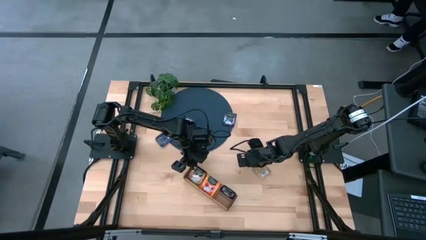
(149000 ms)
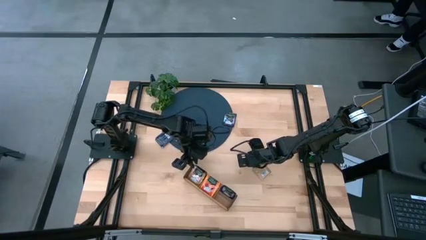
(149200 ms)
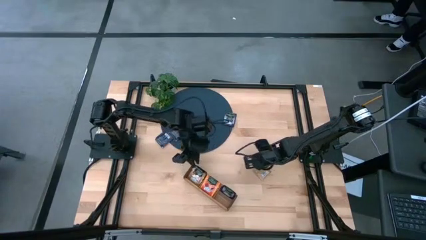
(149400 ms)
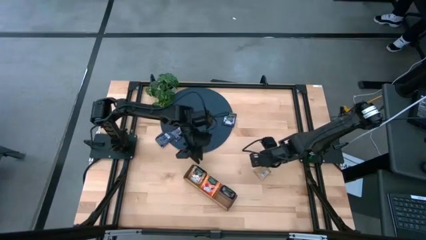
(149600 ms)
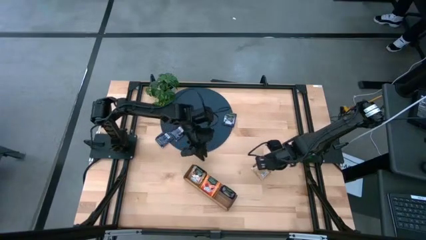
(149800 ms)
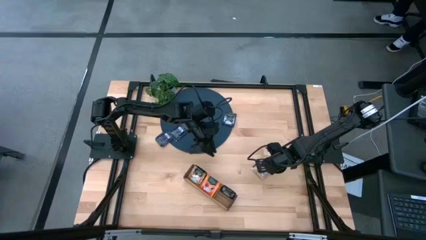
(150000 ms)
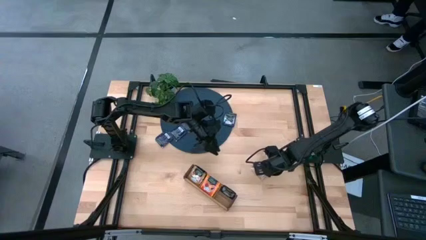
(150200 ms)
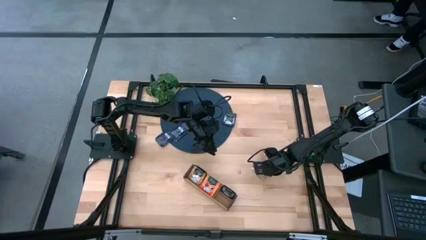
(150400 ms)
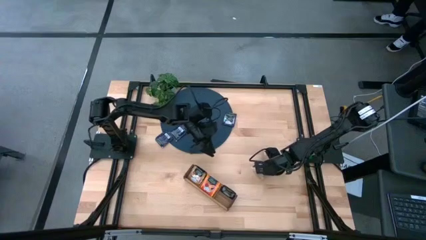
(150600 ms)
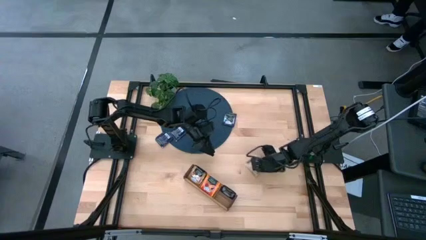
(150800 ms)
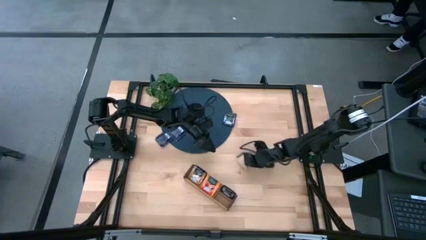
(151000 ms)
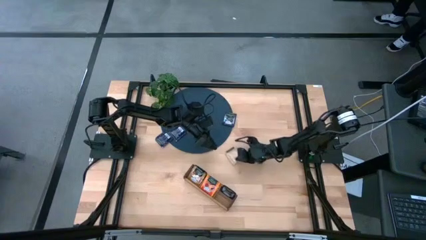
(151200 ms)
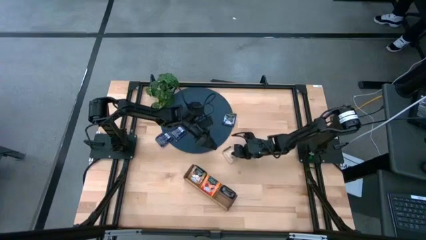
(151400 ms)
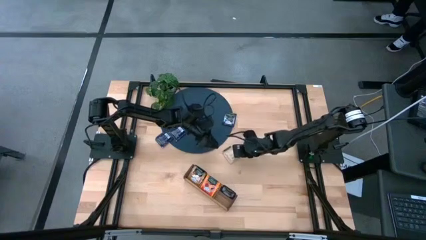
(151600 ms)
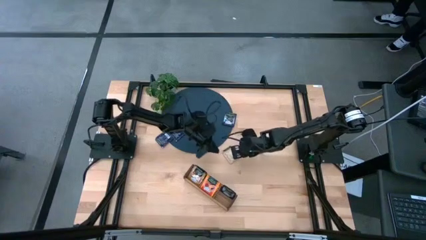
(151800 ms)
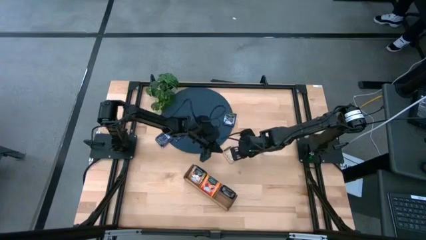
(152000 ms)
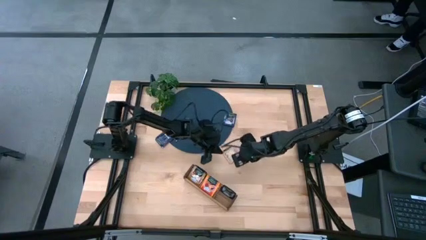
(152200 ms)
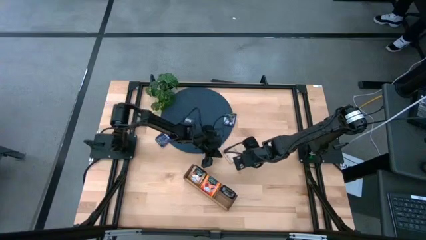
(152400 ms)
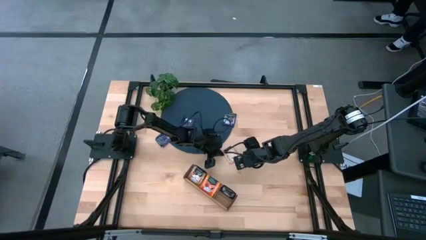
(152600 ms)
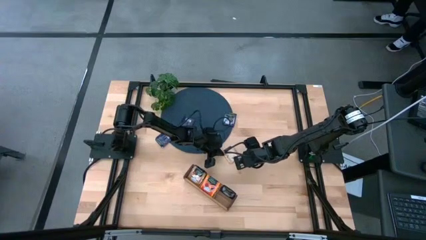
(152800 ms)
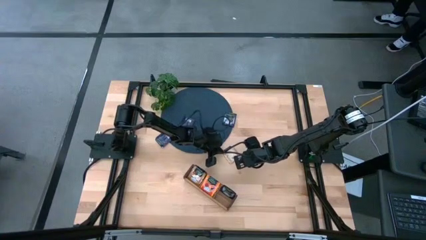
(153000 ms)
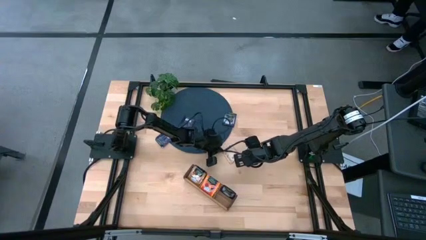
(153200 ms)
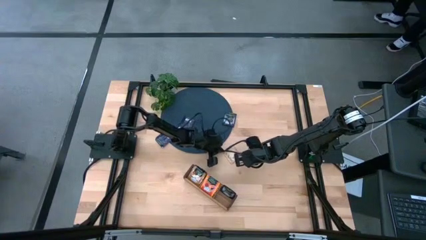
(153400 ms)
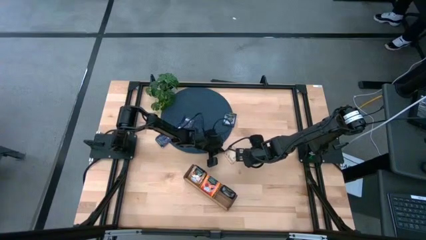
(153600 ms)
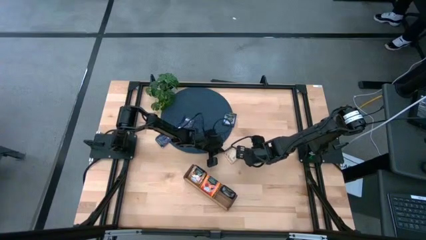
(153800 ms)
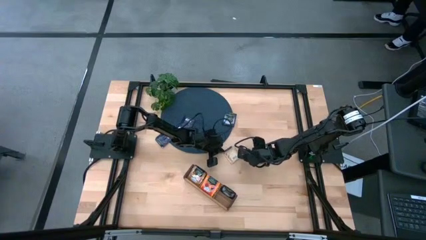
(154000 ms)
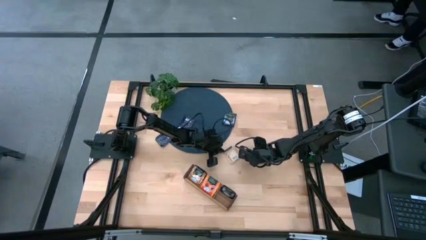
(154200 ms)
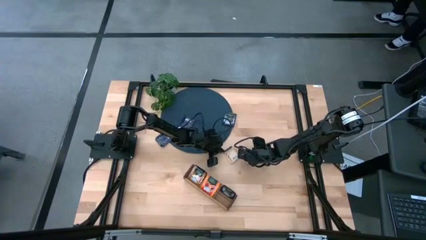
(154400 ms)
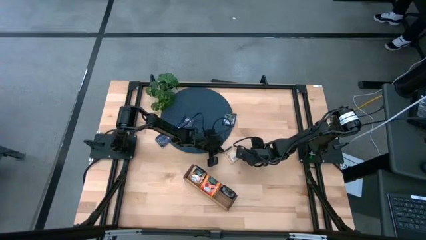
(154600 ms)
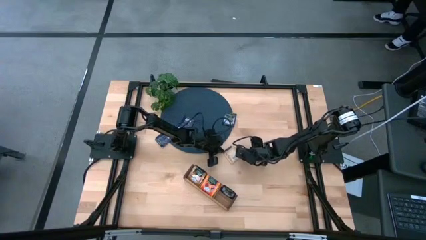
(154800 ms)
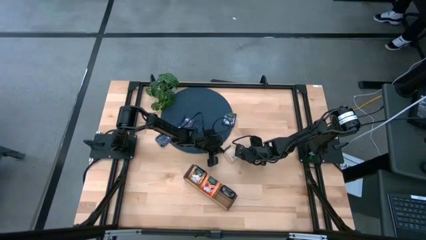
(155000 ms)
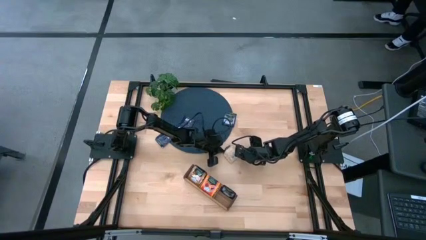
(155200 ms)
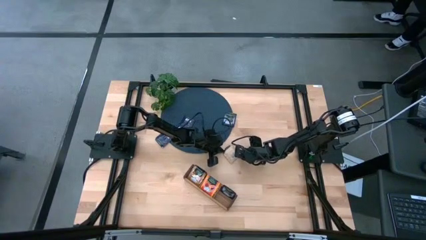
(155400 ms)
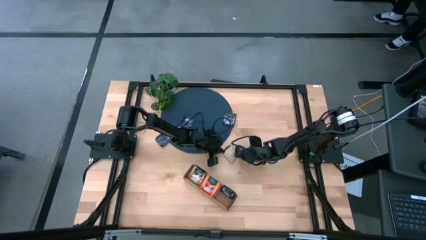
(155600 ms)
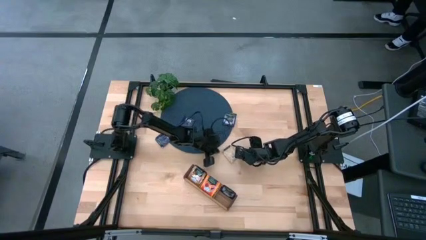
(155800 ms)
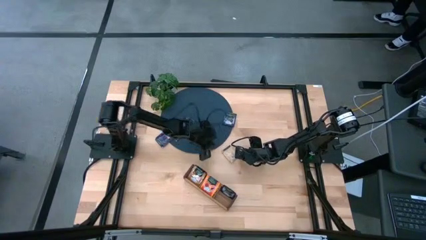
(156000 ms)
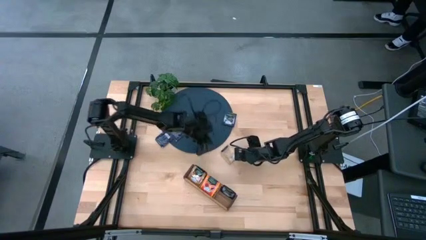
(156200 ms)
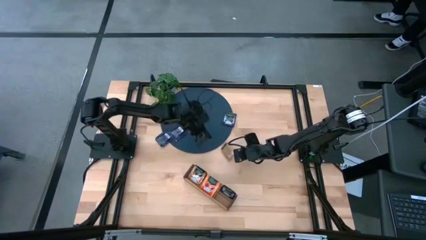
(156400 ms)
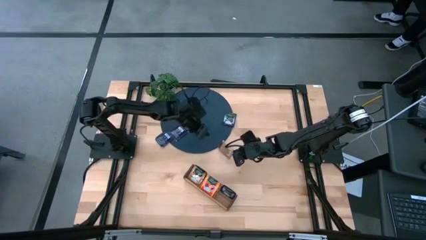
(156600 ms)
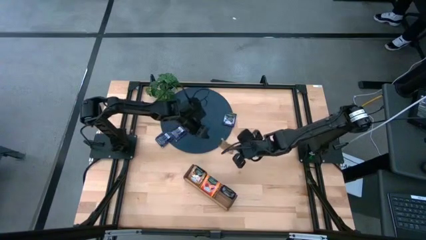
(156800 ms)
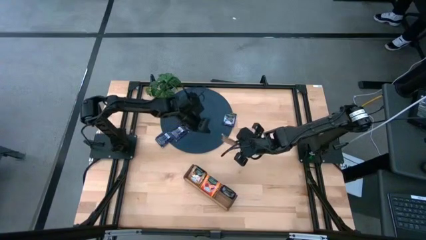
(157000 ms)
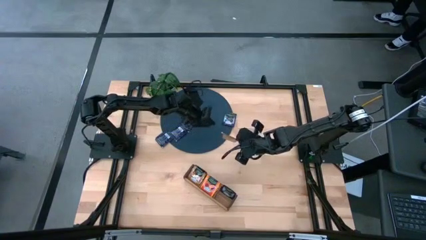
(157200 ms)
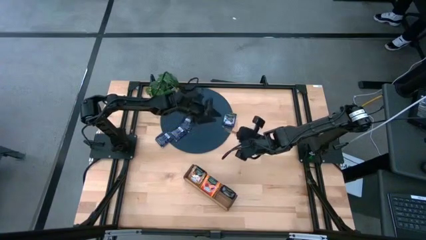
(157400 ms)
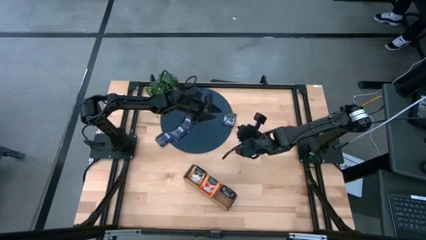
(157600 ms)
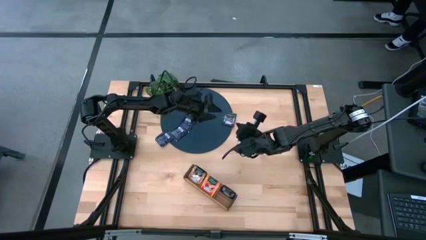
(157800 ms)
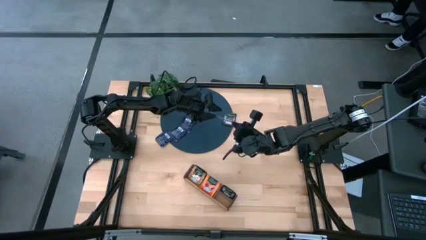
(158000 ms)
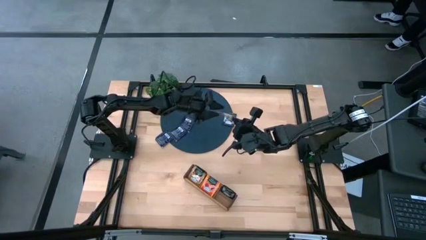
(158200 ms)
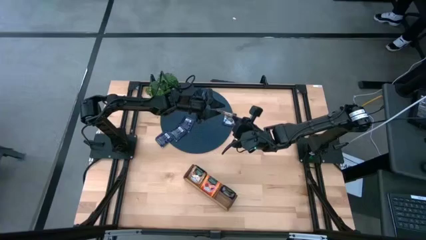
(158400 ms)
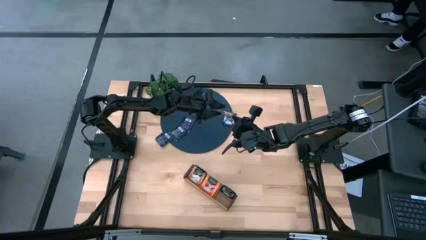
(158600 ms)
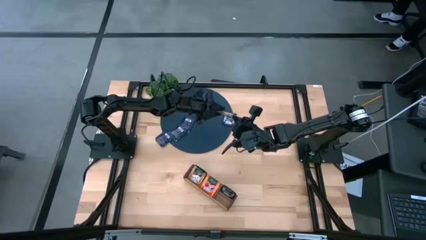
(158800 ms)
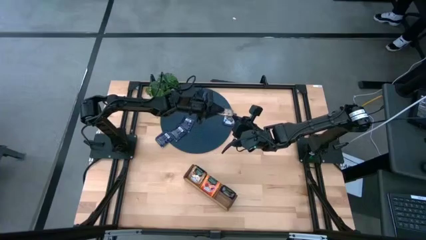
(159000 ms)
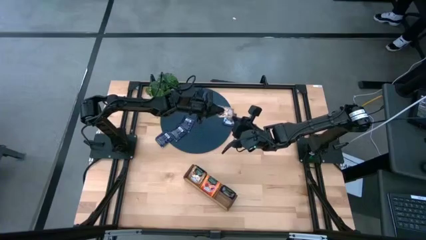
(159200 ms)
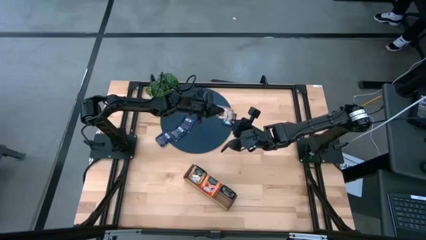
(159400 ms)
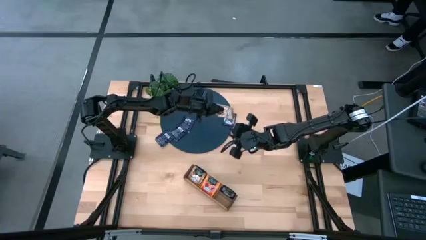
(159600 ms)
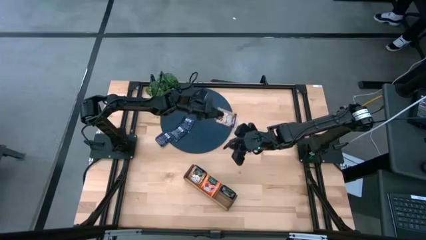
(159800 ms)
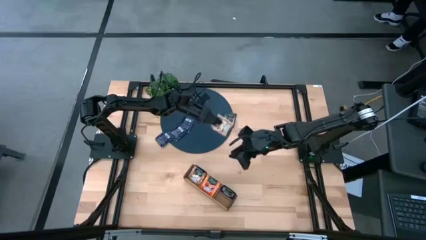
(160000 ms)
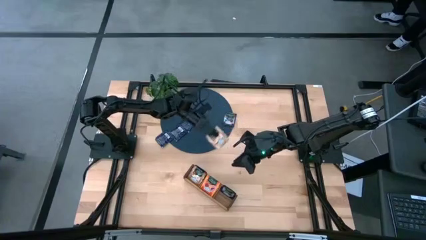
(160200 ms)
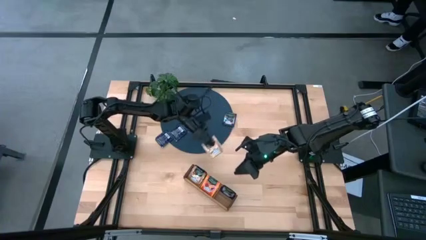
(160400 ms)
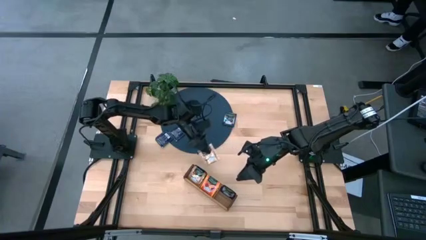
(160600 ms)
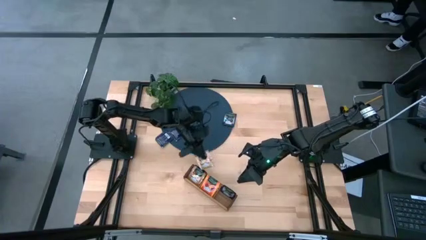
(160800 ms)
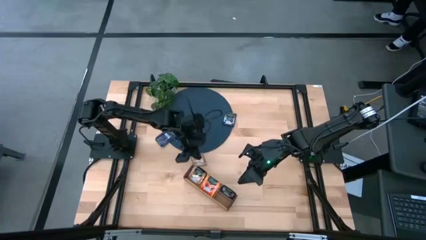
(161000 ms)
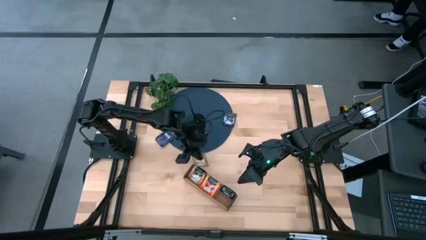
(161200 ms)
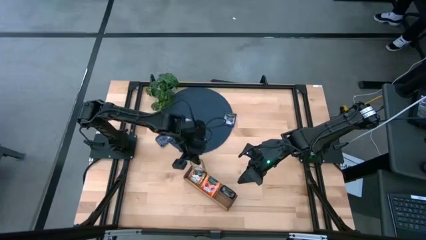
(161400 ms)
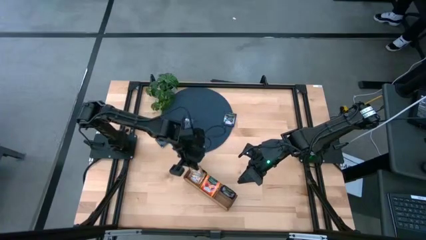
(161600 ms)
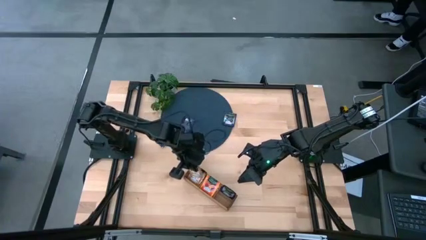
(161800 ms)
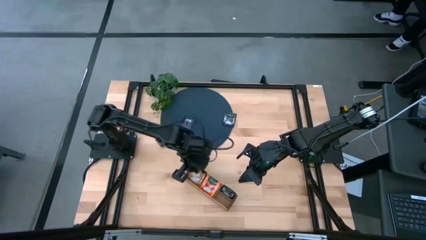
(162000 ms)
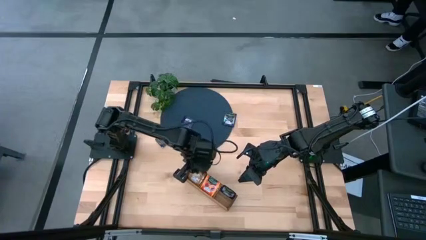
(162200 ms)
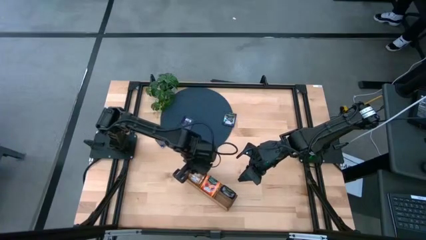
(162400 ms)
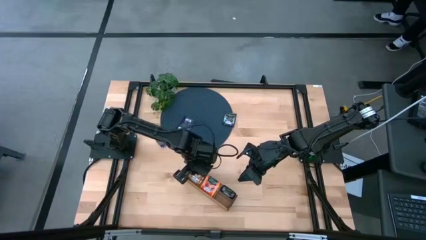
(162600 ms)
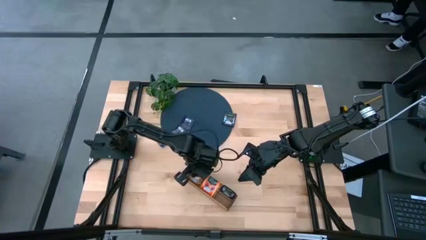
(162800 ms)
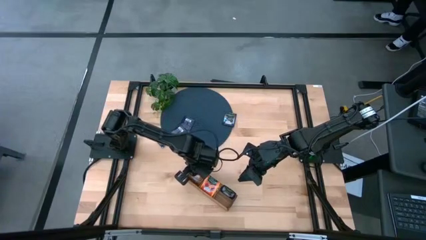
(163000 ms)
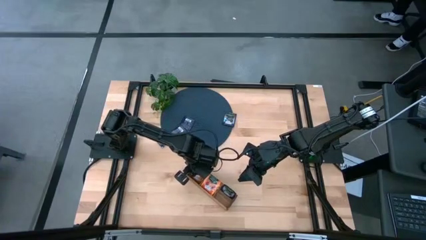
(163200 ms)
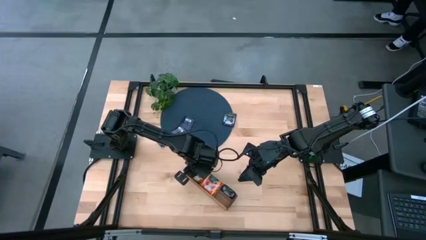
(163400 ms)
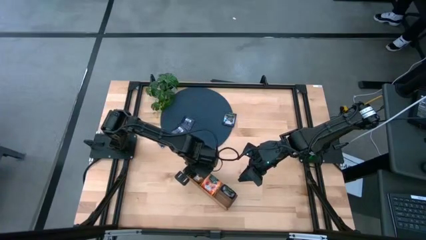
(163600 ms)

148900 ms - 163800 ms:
Task: Pick & Place Tea
Put the brown tea bag into the left section of the wooden organizer

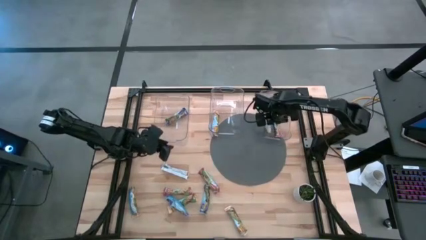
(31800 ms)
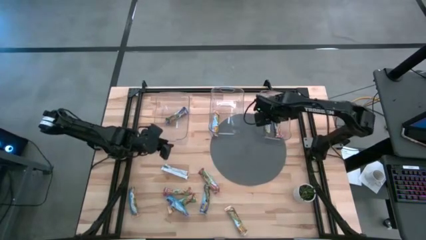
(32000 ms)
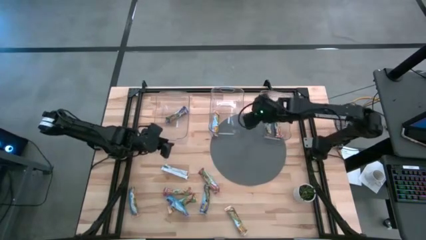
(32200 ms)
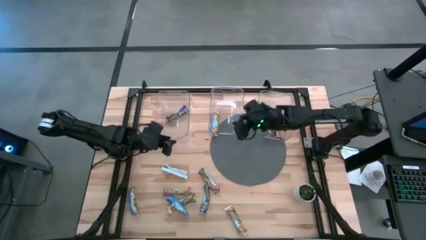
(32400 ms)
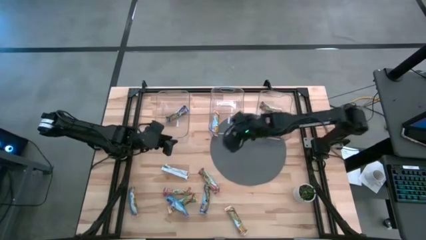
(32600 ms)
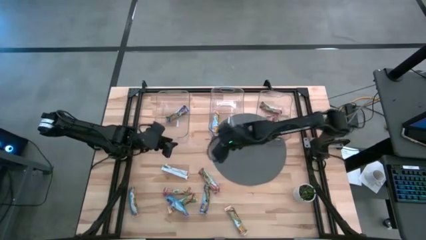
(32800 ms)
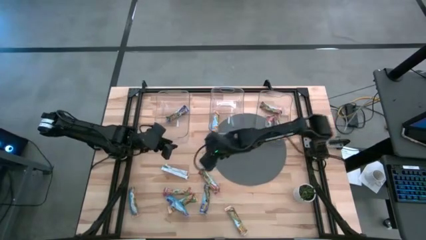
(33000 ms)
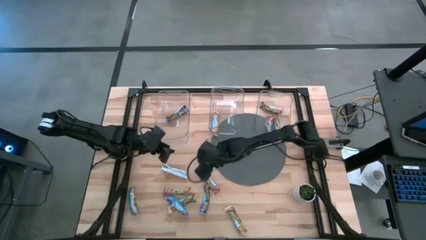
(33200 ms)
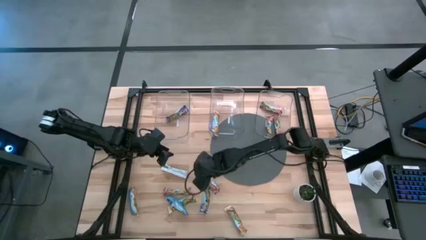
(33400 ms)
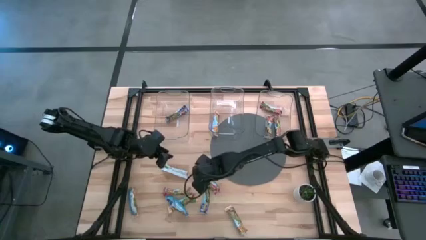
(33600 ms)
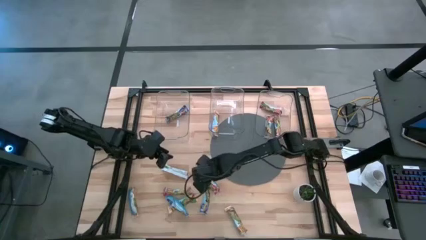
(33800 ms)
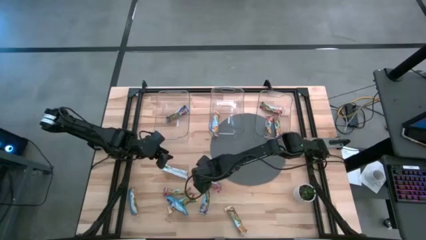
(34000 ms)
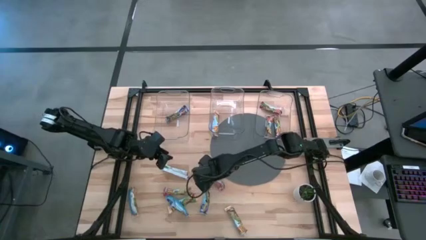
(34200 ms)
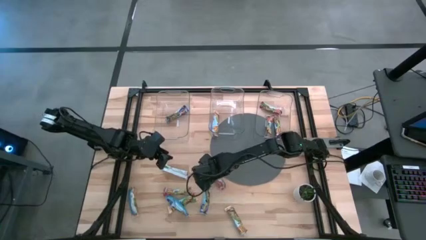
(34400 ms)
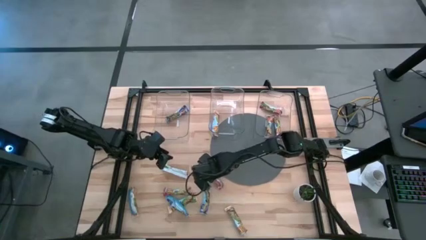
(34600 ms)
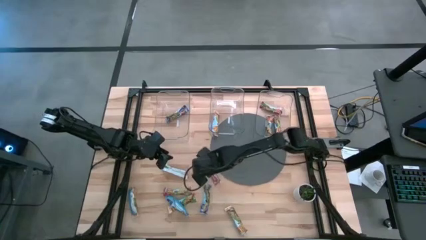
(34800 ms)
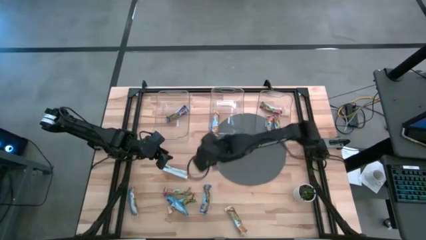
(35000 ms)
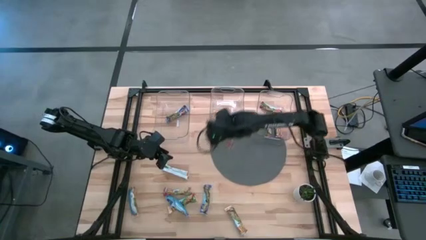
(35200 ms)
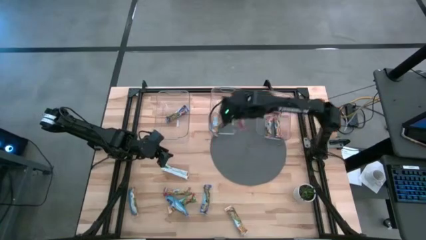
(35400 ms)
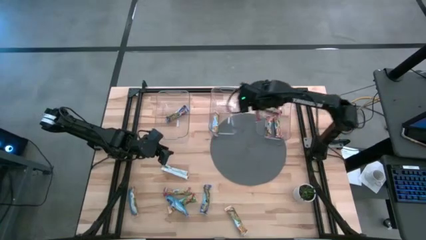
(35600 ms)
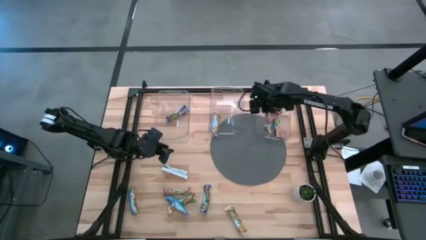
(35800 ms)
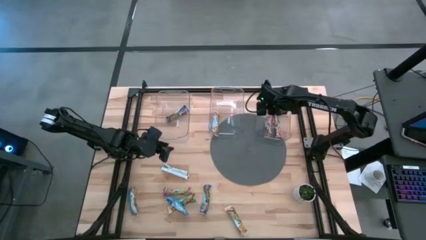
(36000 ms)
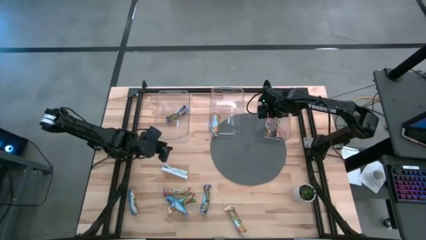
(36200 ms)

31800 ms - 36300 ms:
Task: Pick and place Granola Bars by type
Put the red granola bar into the right transparent bin
